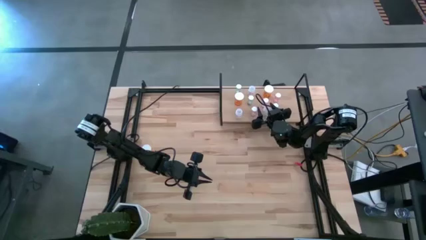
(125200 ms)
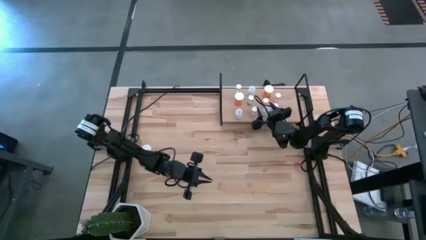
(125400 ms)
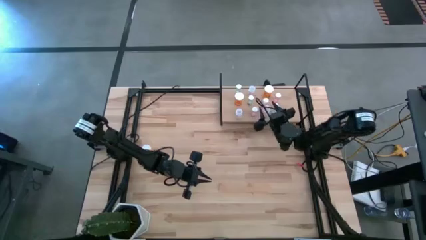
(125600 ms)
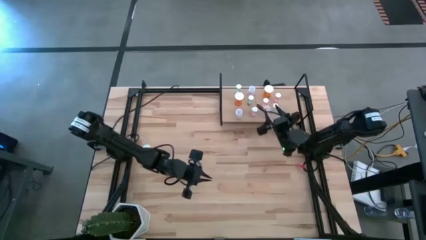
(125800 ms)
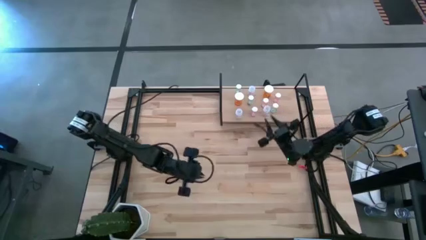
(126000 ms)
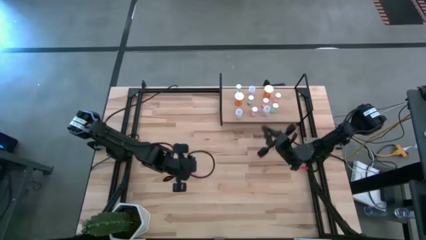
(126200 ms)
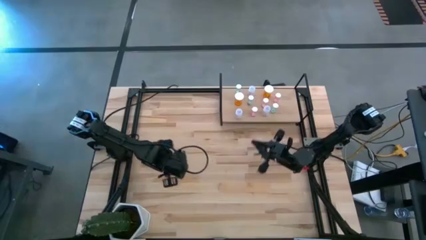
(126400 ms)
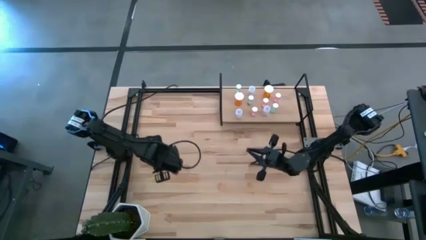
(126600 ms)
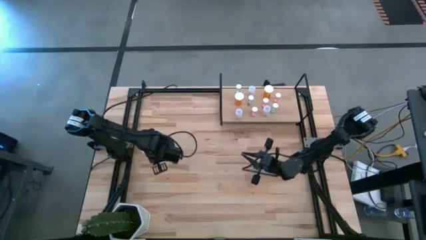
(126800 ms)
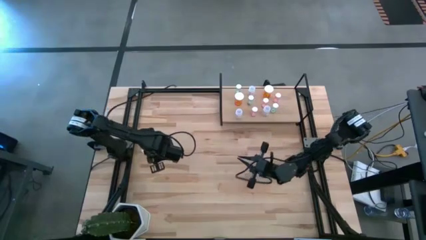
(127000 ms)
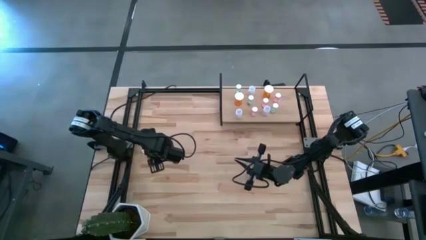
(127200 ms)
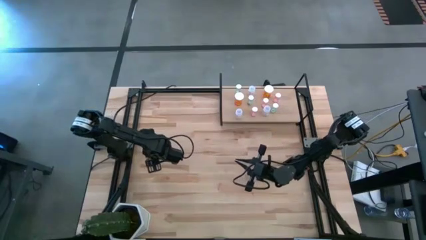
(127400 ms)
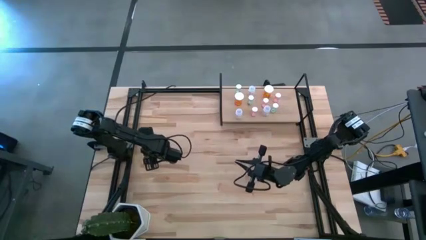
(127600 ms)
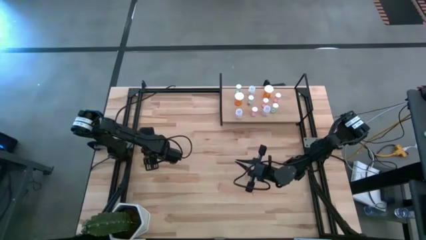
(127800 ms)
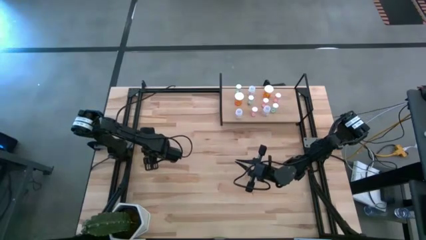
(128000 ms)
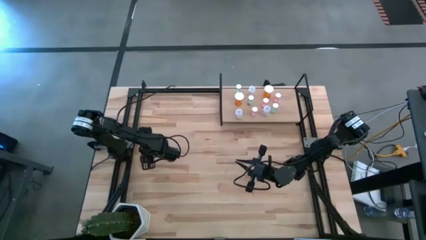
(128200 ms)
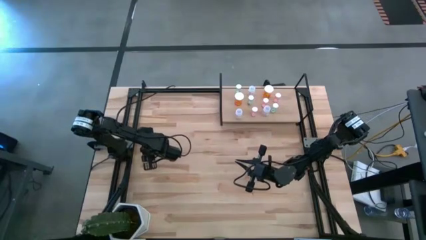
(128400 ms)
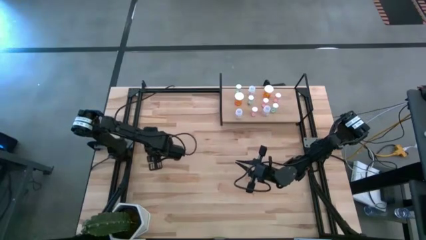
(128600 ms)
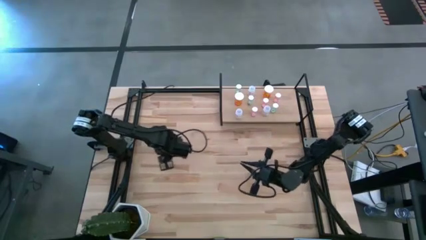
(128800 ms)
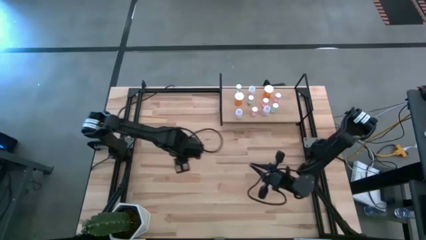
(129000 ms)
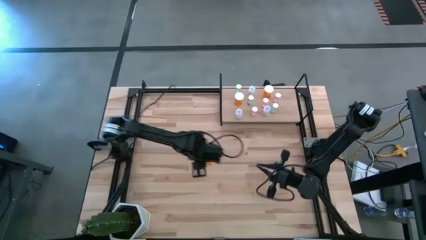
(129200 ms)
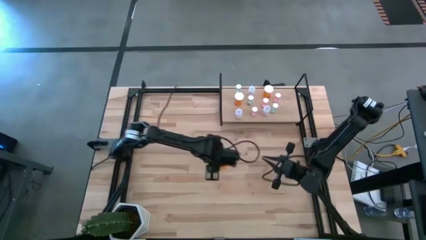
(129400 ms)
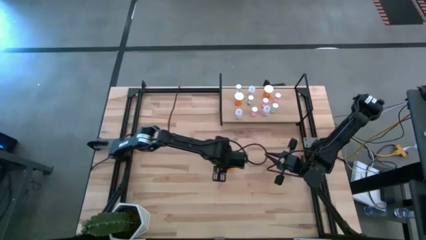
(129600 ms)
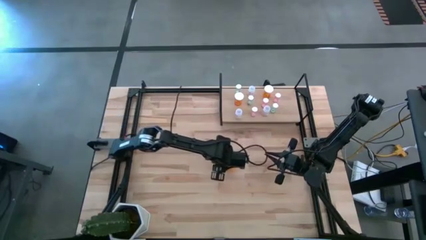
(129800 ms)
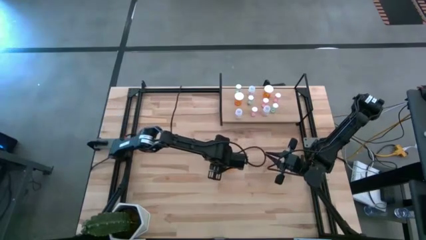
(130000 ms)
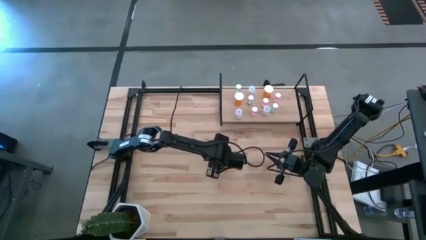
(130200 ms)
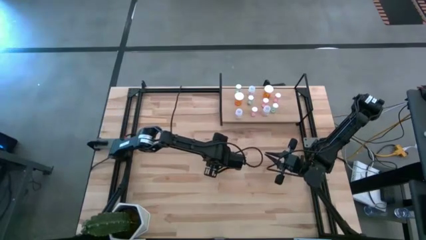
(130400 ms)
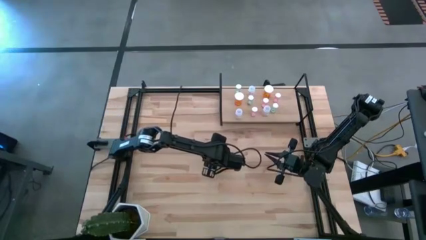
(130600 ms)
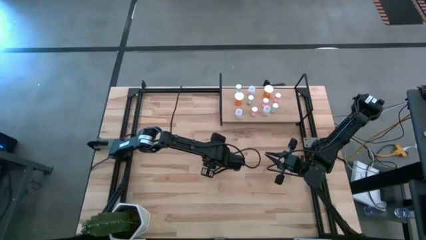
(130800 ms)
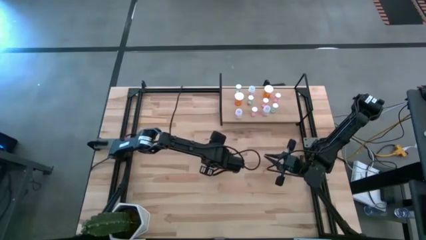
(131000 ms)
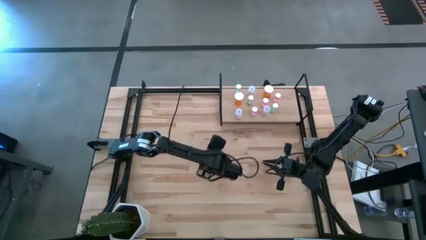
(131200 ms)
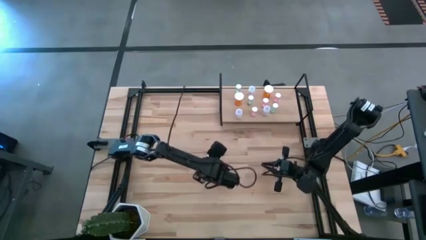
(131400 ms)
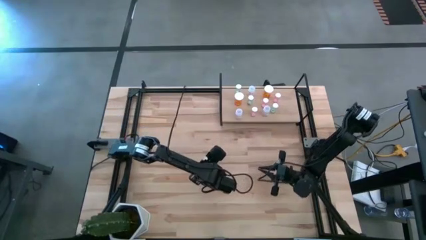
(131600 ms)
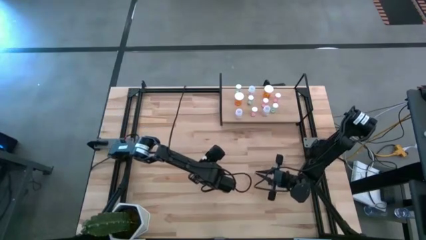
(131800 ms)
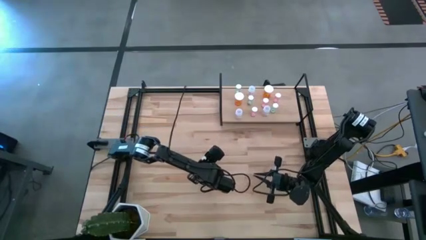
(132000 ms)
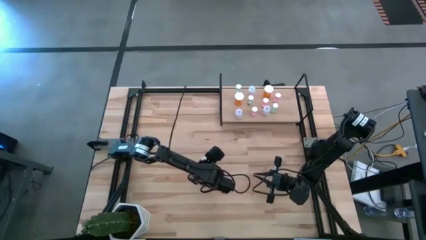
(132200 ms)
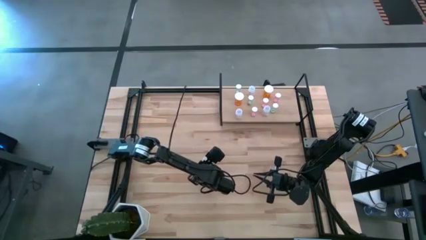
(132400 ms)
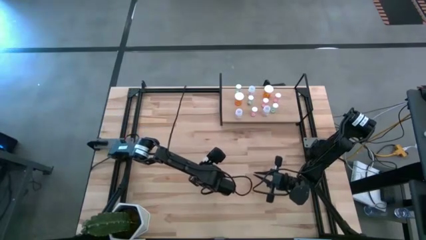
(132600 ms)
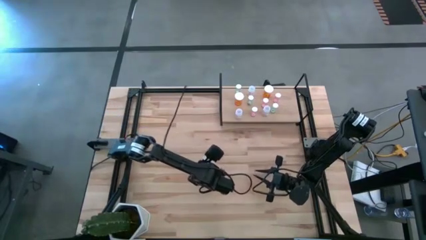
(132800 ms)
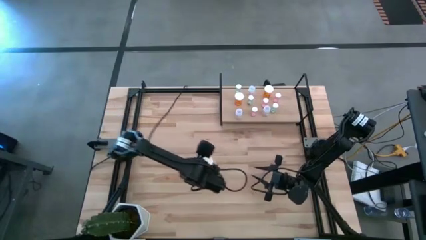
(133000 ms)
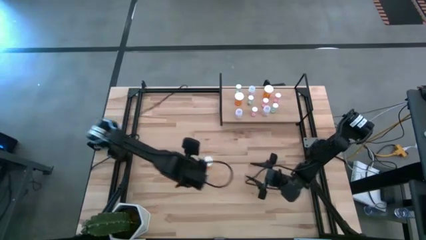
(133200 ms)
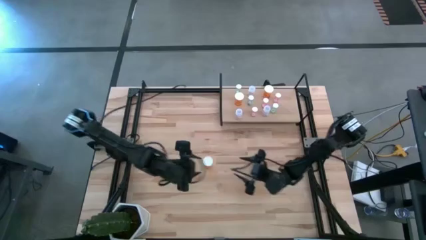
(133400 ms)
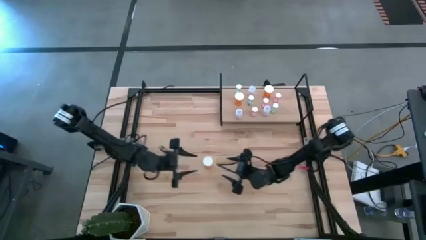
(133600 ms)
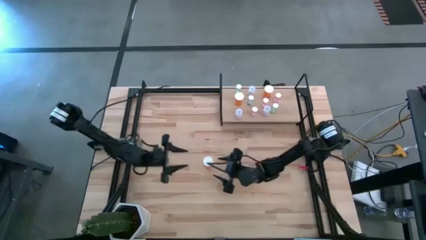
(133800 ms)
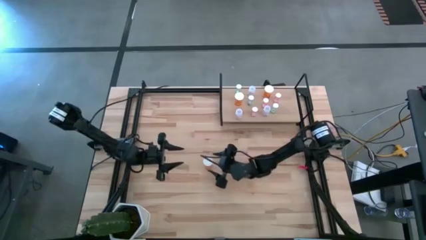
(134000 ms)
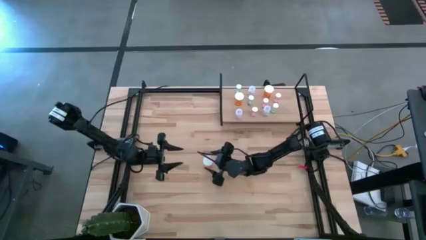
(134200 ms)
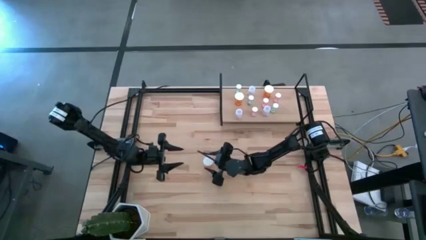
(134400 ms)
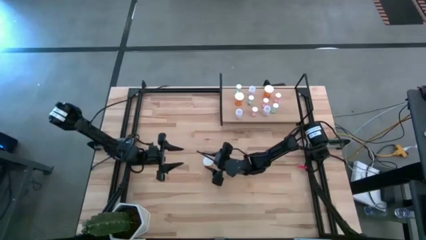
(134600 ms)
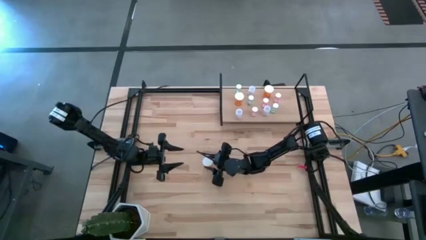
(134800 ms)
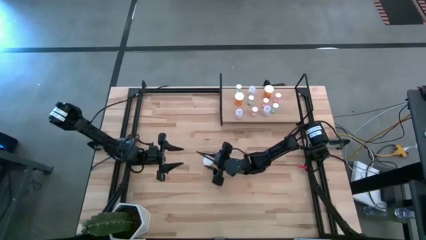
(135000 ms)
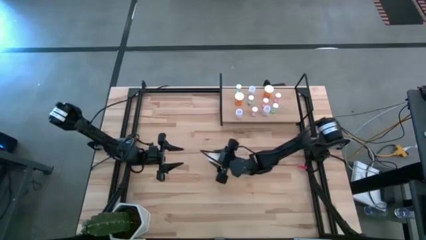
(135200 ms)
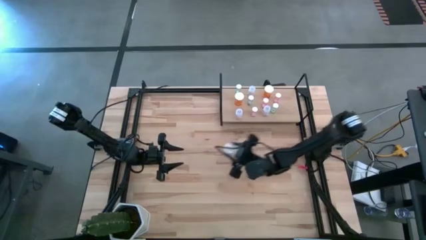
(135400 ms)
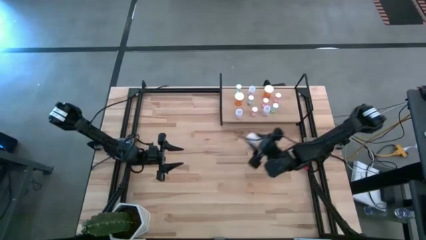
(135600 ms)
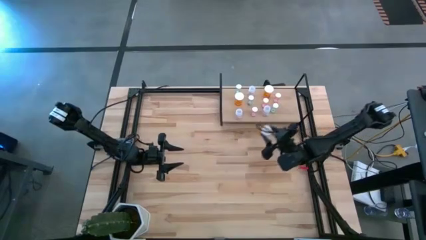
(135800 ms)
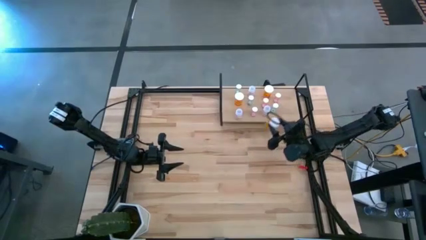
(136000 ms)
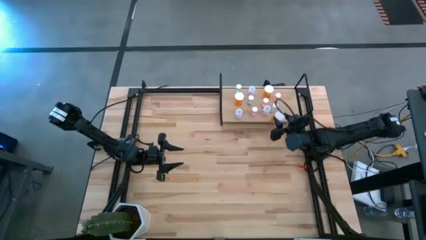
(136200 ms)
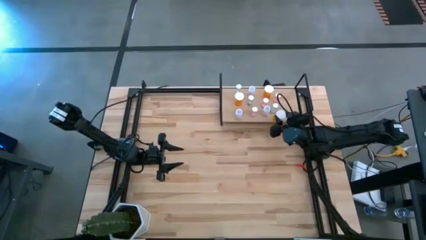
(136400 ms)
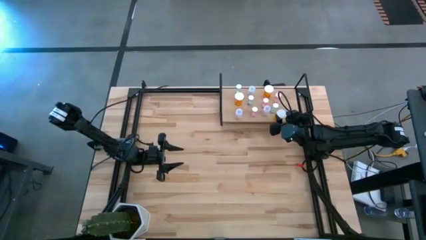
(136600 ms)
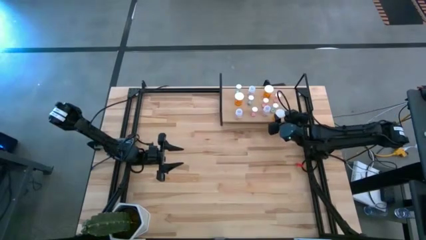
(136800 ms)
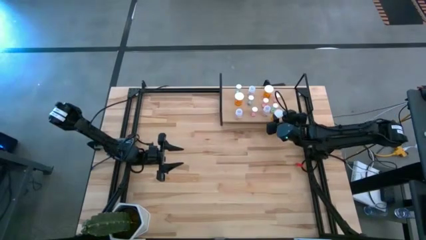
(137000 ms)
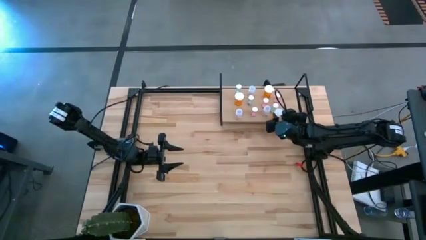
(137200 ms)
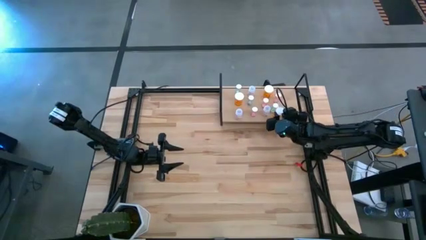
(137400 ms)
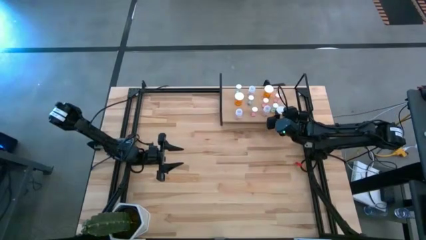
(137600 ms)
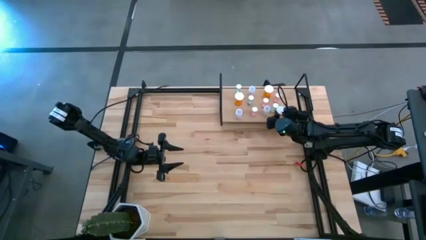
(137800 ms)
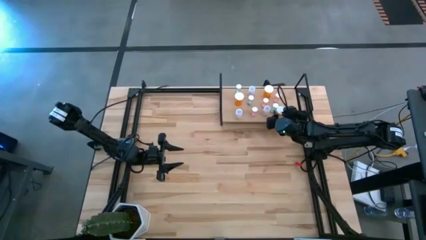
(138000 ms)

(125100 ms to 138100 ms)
Task: Pick and place medicine bottles onto shelf by color
Put the orange pill bottle on the shelf

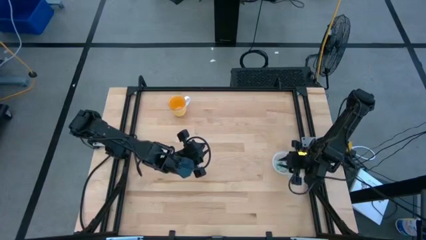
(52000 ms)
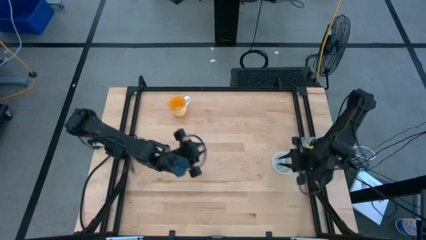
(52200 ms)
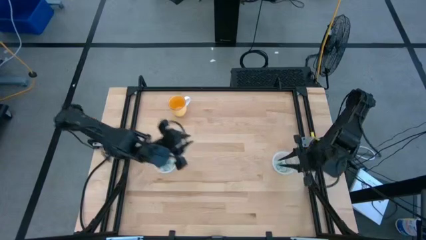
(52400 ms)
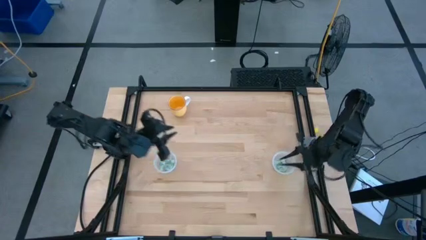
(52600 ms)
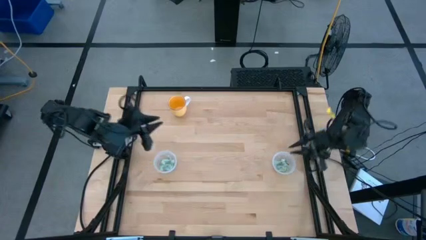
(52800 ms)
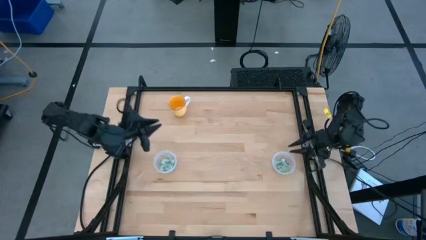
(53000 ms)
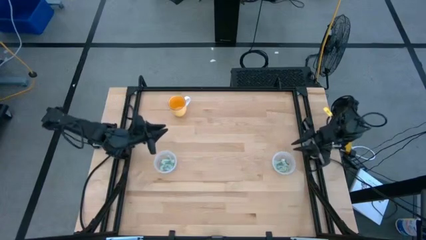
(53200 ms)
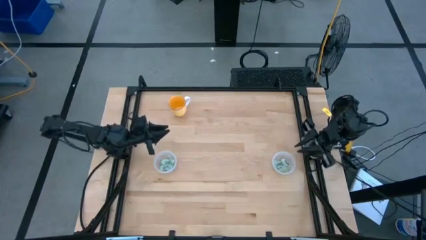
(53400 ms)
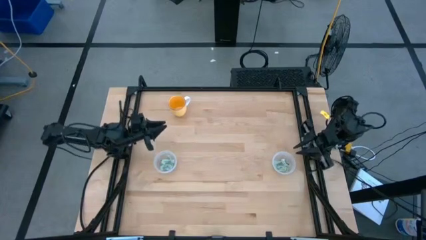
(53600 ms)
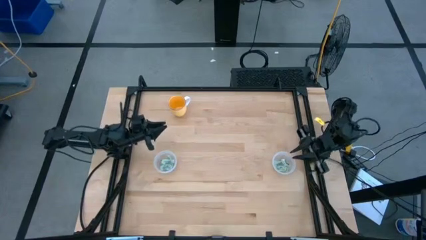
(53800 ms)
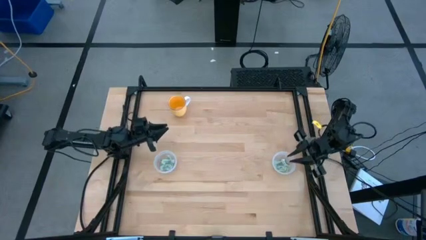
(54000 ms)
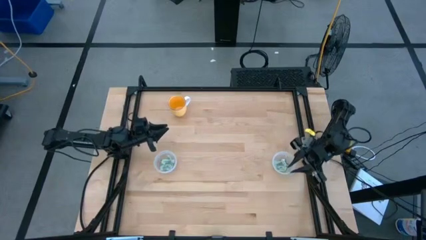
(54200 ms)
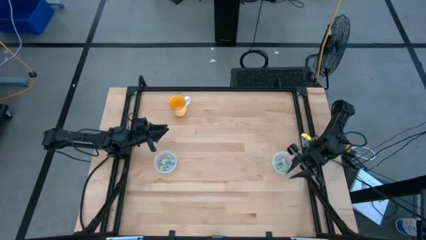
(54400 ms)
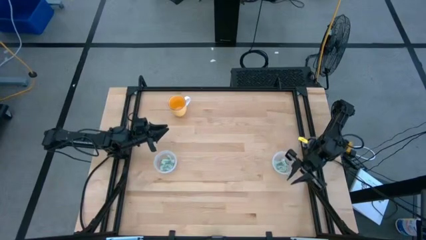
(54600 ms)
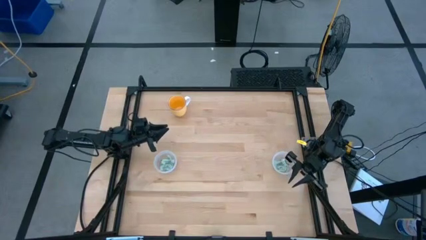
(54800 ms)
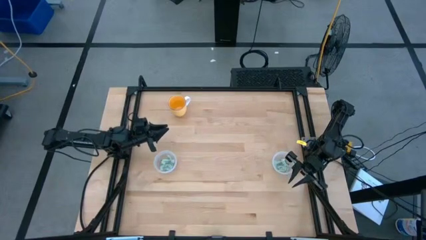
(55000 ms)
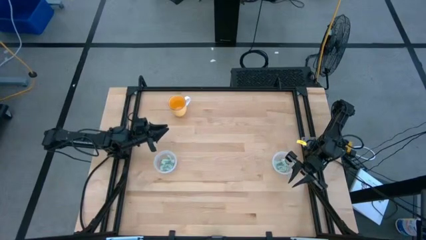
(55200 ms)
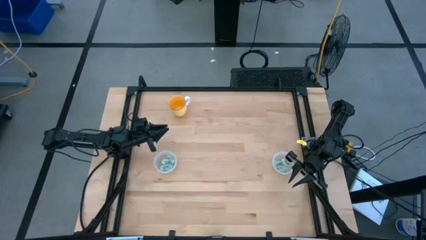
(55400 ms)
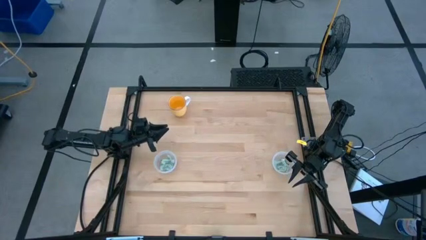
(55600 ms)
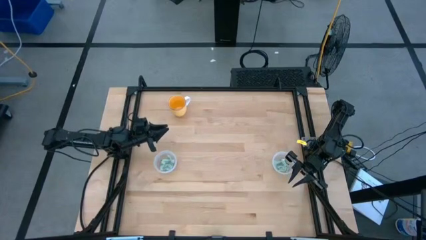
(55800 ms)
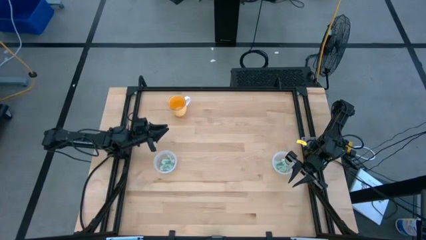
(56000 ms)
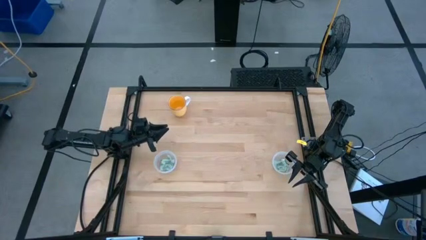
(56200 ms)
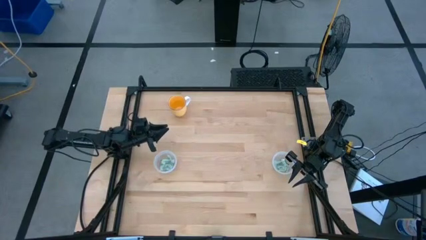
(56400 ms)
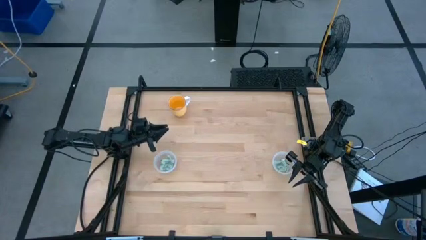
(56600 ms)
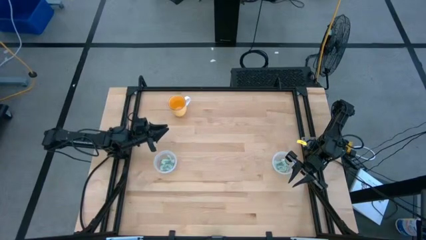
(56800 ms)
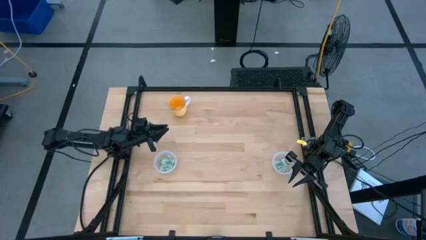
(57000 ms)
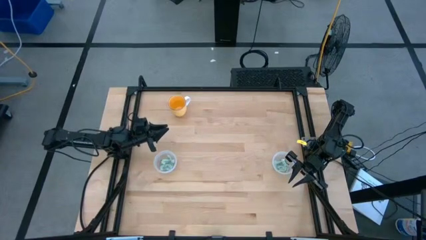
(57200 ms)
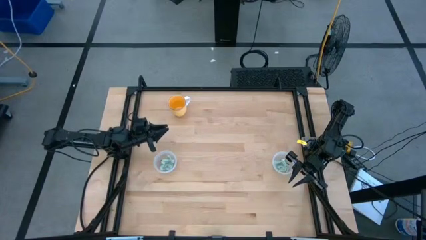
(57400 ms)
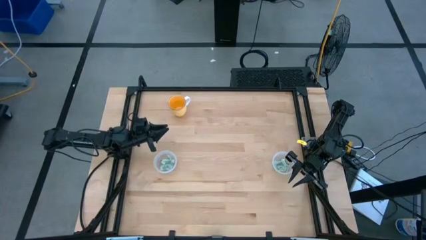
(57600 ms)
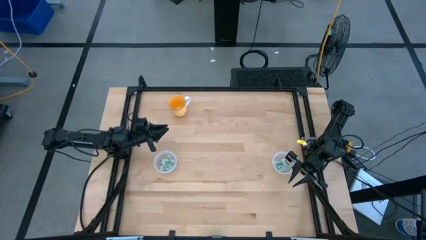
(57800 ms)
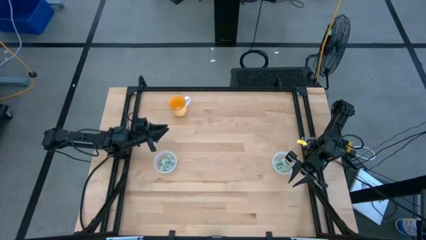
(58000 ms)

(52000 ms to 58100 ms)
Task: Pick and place items into bin
Return to Home Position
